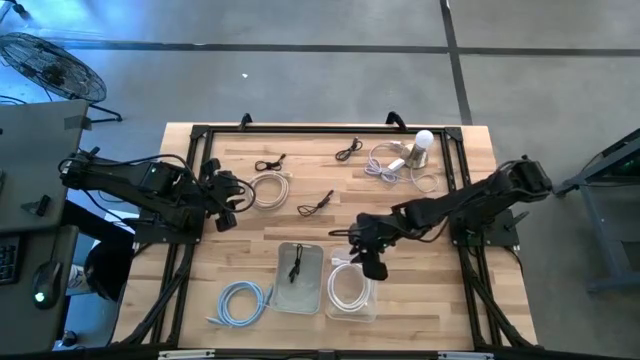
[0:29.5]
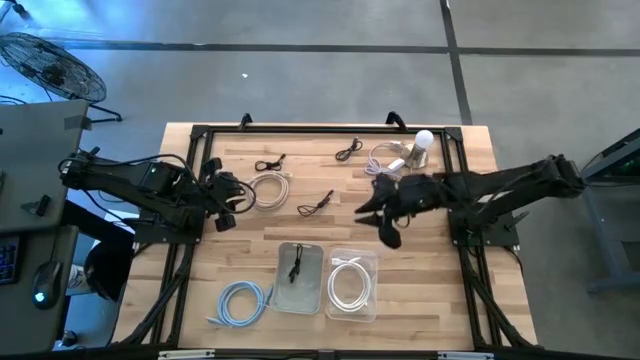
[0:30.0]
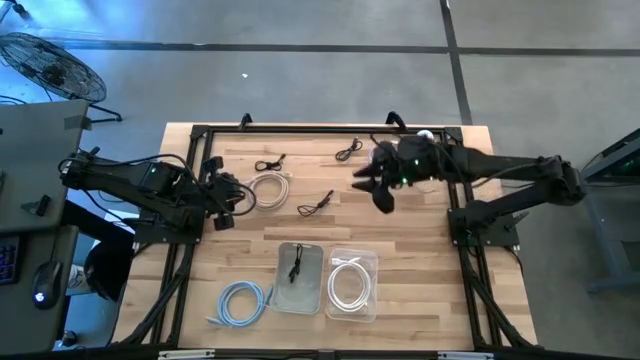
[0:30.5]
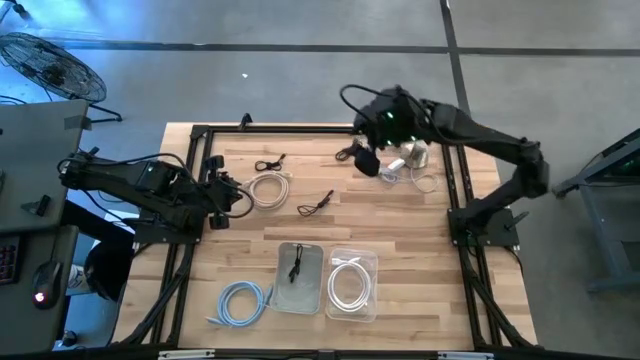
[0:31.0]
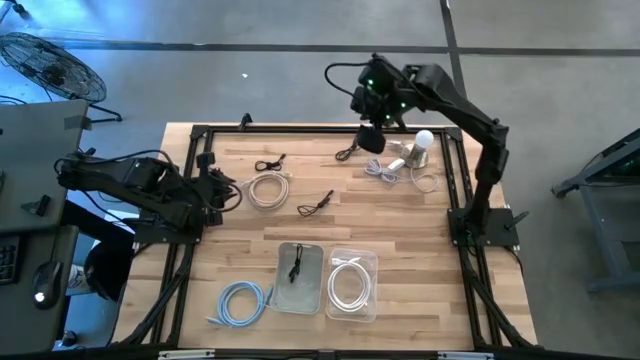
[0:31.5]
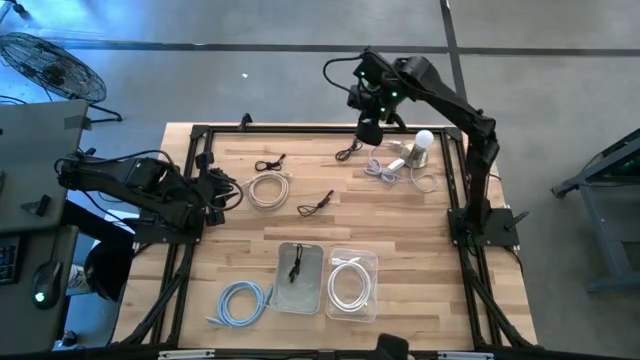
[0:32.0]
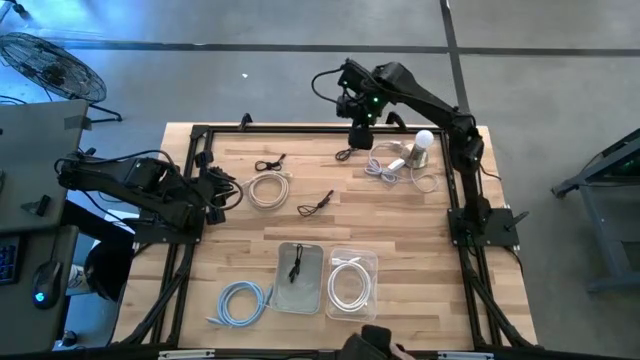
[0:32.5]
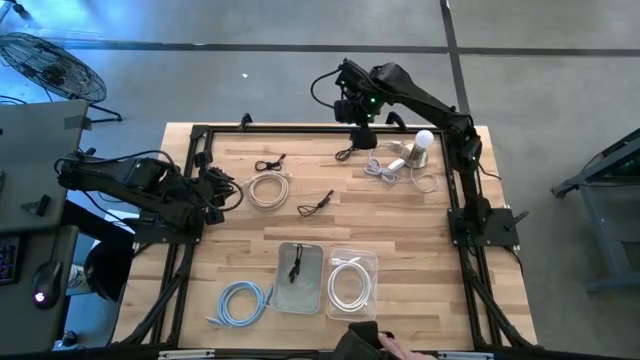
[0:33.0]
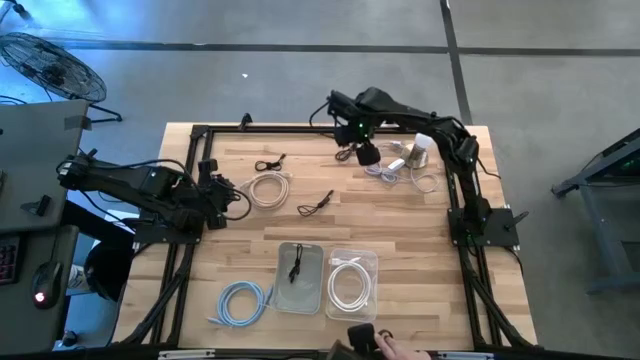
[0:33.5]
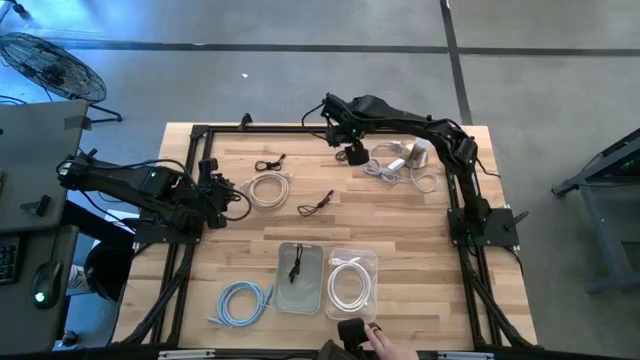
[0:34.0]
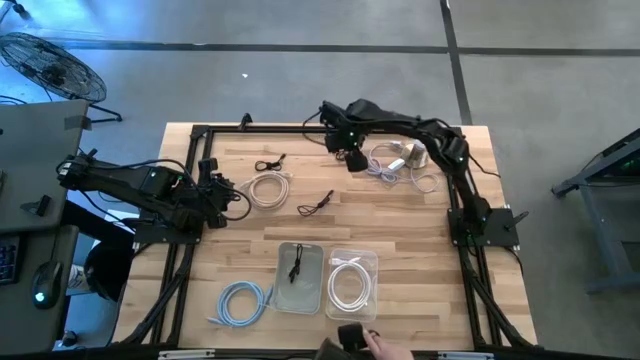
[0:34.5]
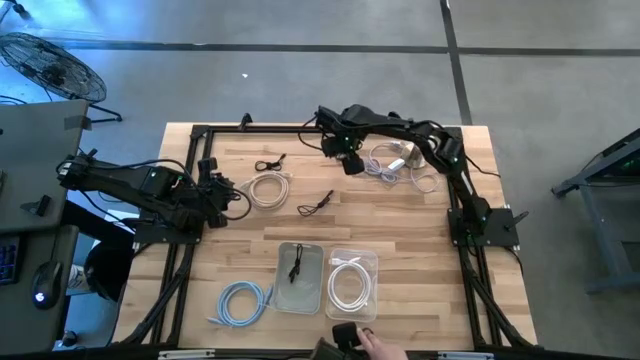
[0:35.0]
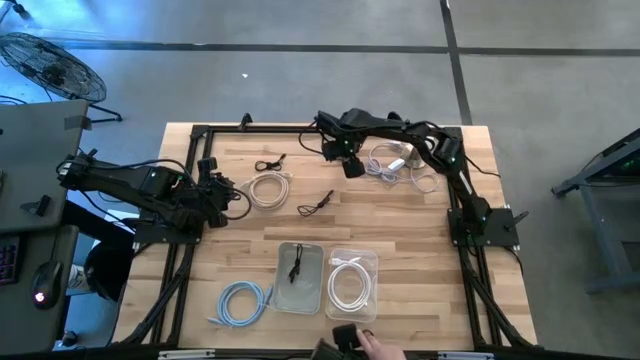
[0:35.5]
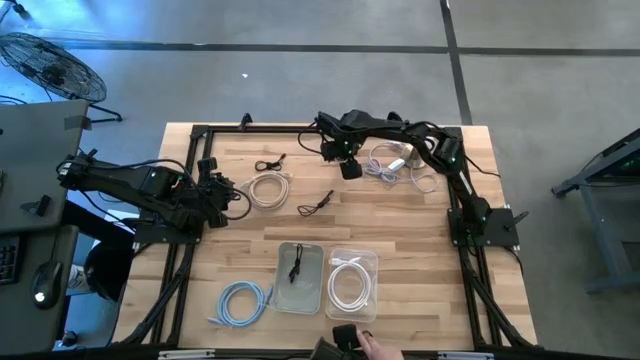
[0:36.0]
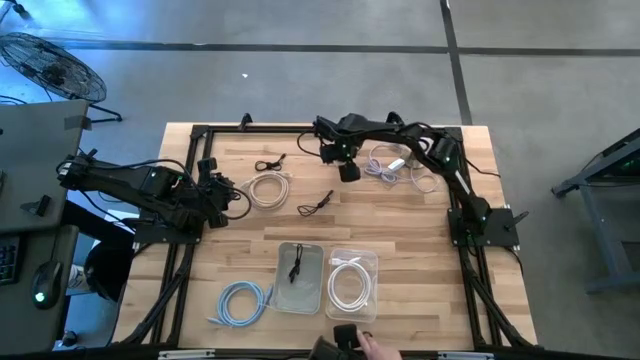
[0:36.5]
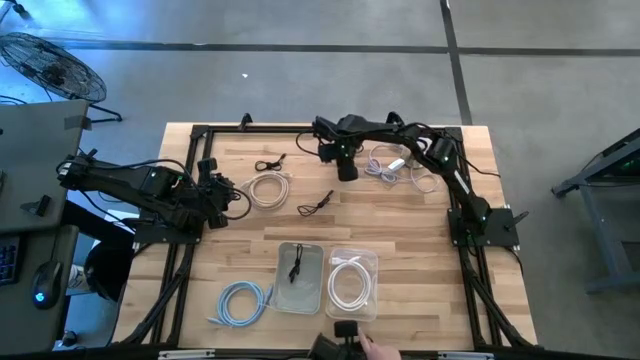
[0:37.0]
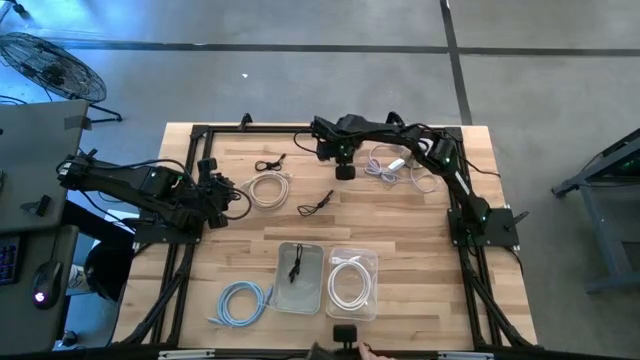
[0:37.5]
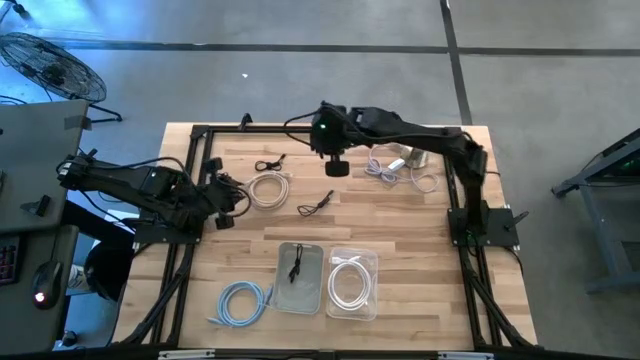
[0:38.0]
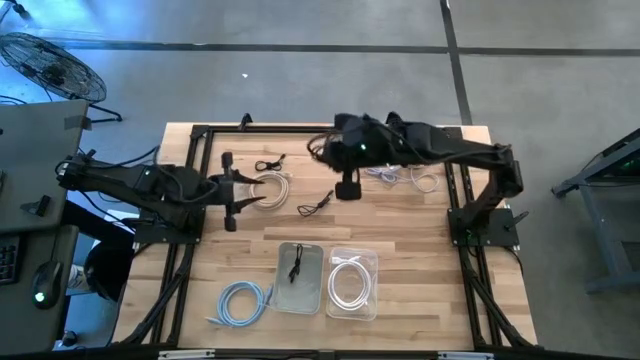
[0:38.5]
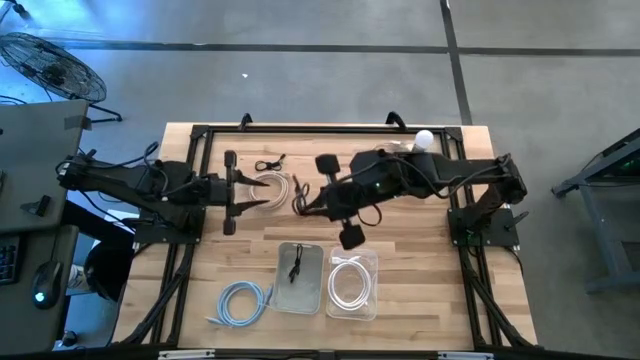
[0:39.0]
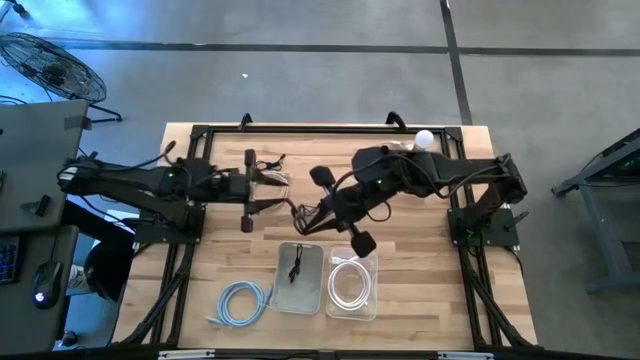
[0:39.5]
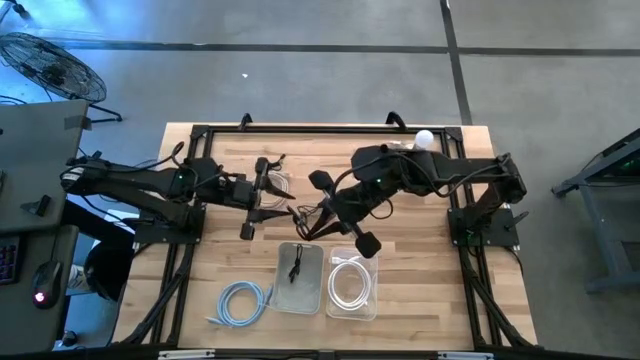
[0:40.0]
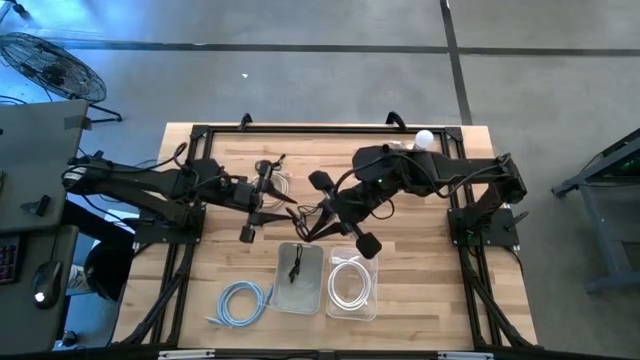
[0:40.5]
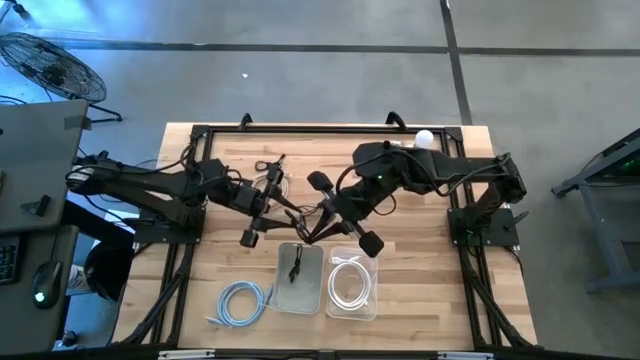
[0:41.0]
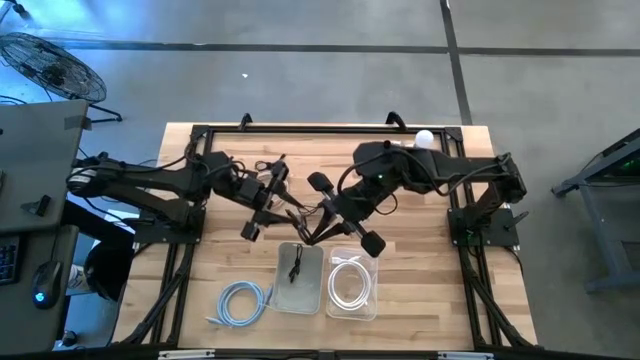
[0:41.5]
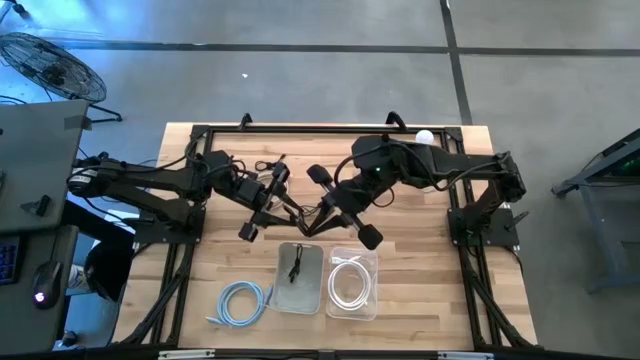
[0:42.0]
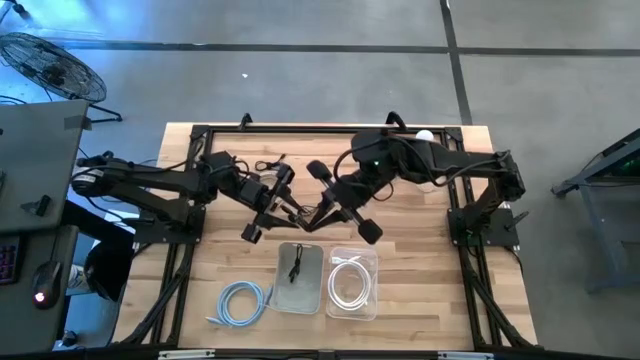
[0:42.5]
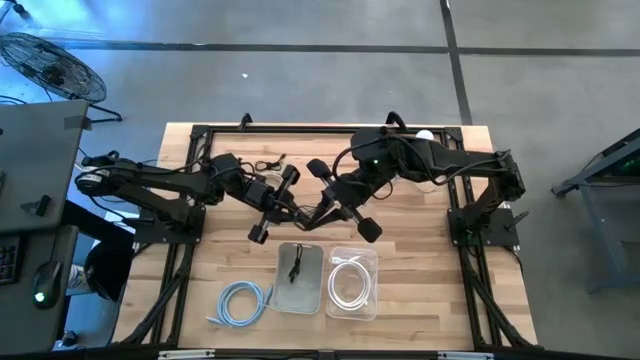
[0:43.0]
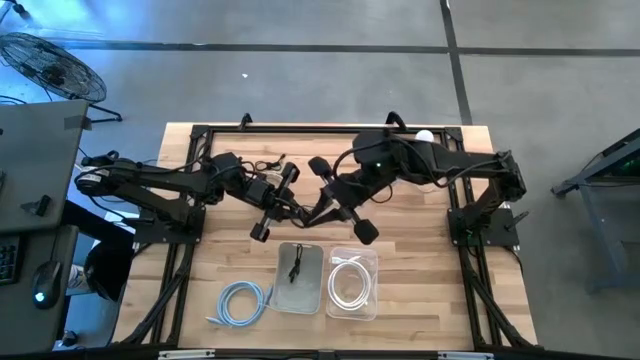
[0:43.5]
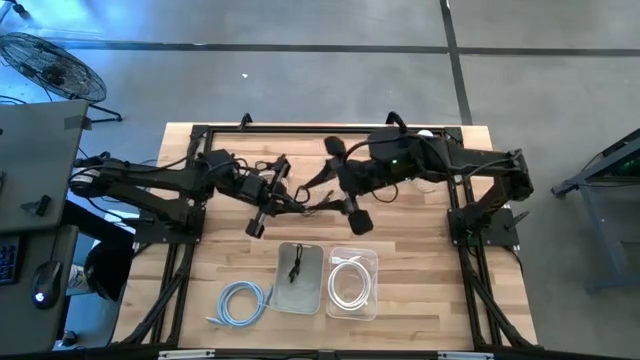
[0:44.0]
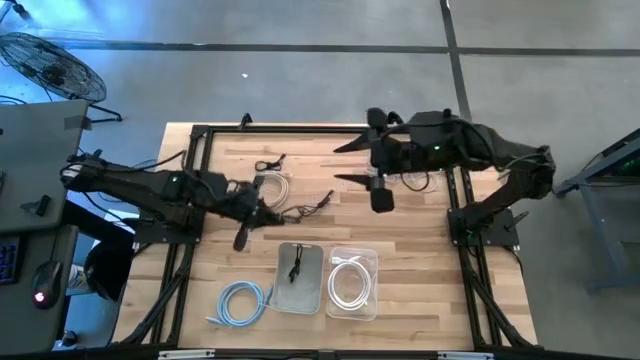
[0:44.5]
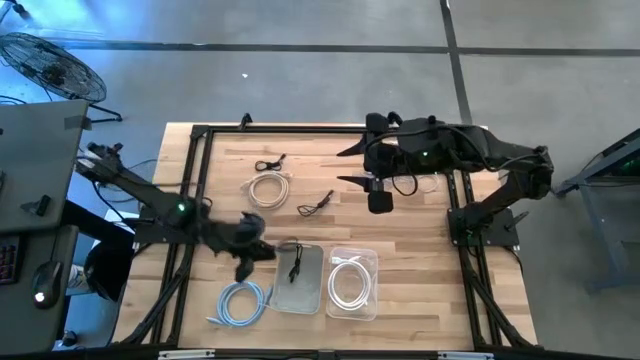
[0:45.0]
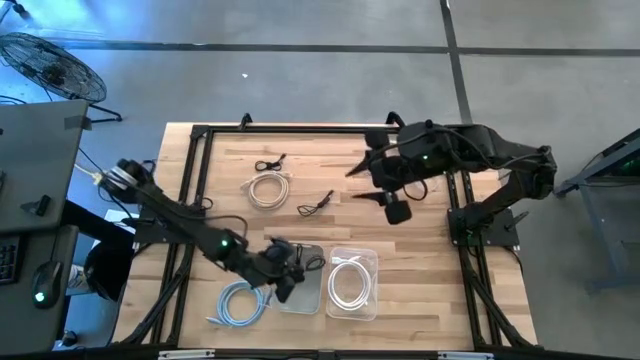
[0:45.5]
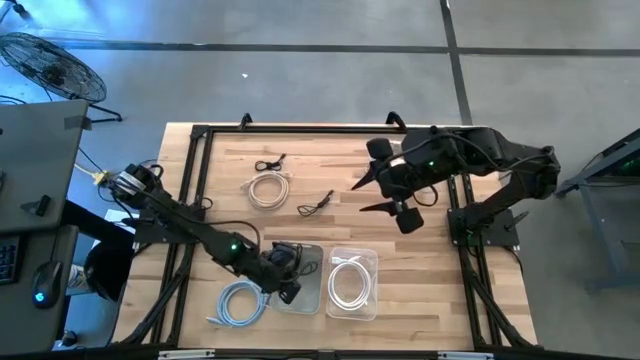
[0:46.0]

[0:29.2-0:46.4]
Task: Pick & Place USB Port
Put the black USB cable into the gray bin

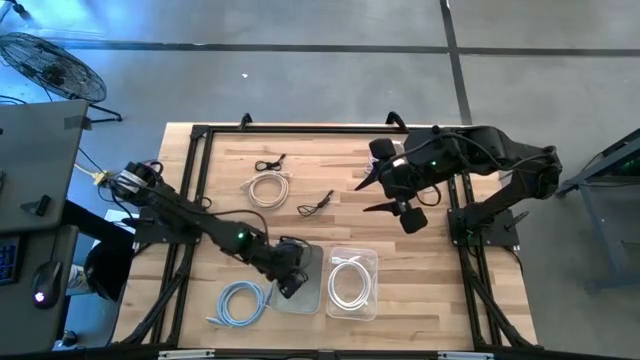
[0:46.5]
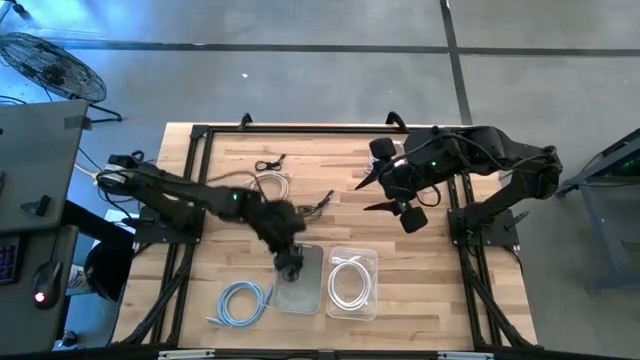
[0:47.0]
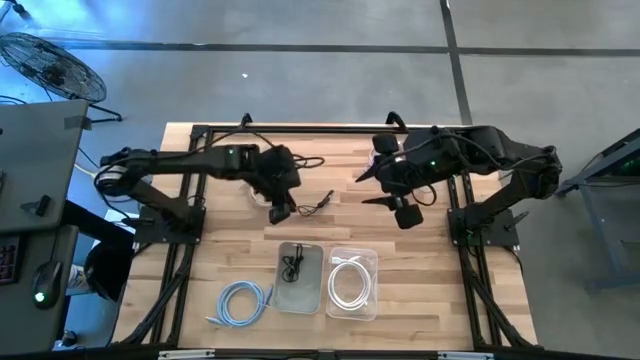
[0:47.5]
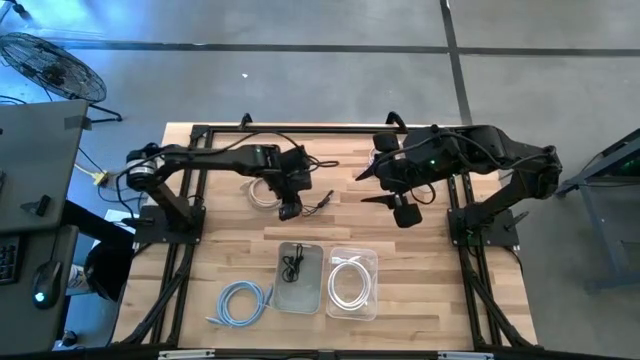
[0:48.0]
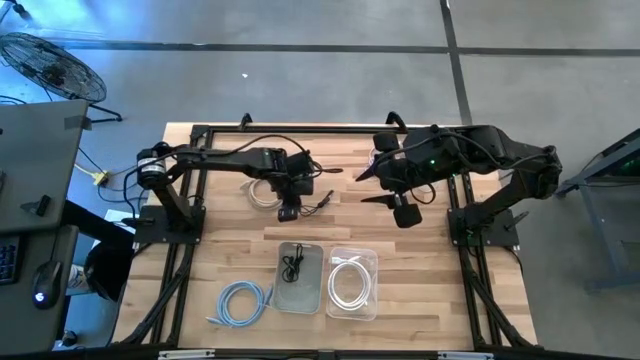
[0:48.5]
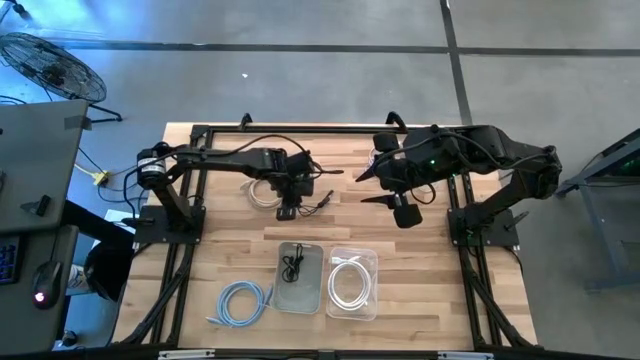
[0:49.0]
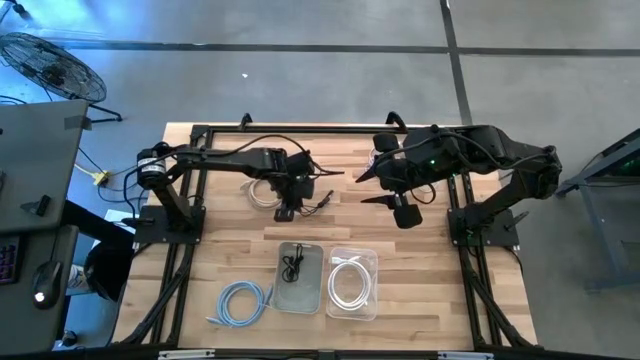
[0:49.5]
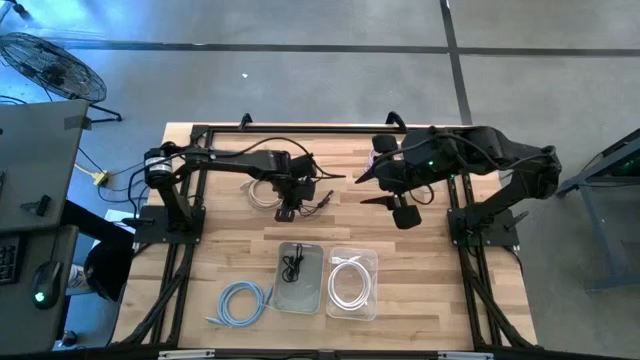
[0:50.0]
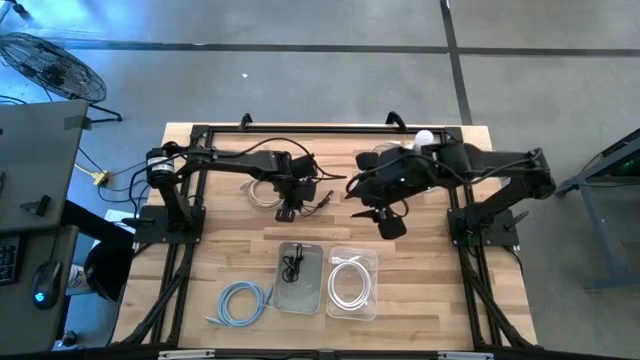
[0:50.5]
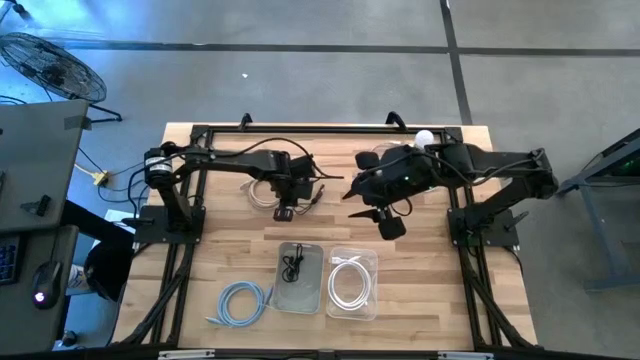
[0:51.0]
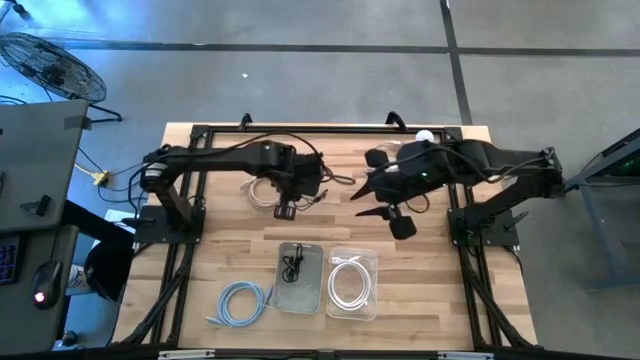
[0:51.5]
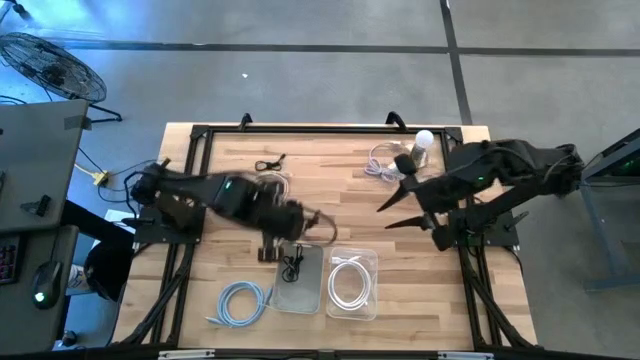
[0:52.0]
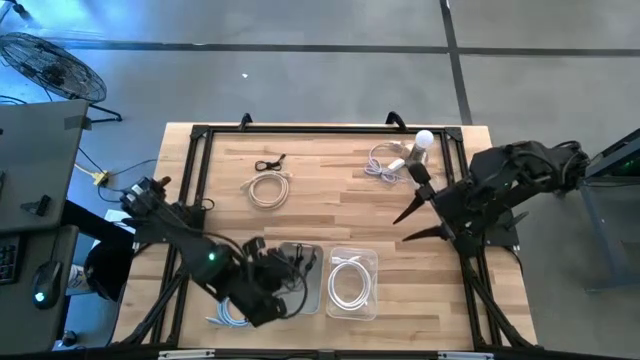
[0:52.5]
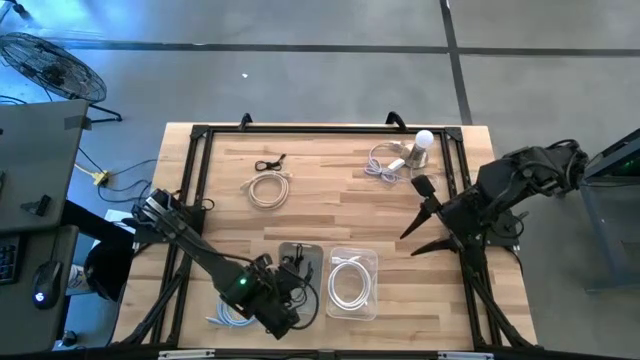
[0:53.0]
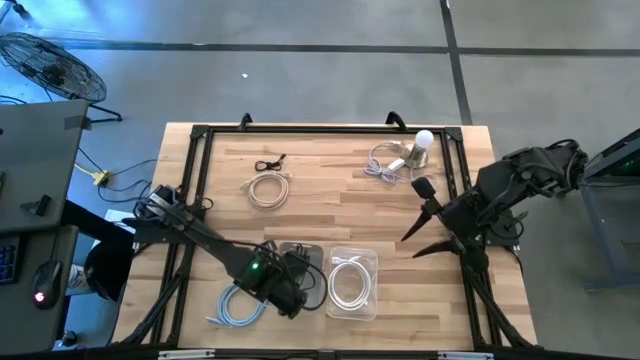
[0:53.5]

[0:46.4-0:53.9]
Put the black USB cable into the gray bin
